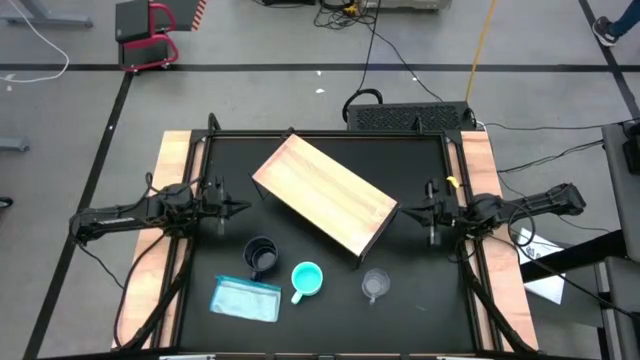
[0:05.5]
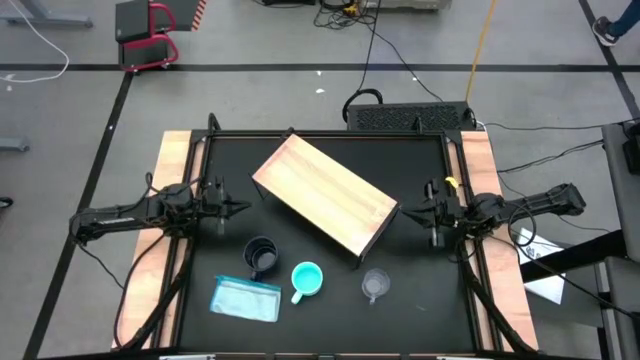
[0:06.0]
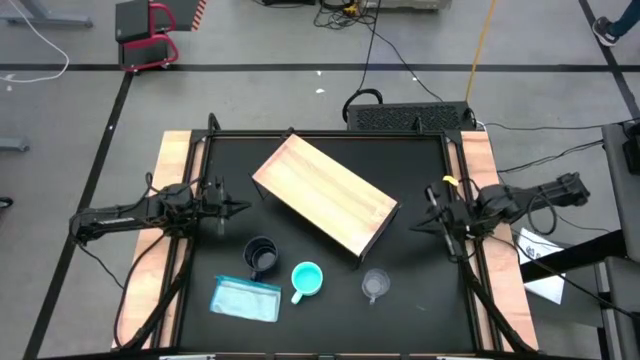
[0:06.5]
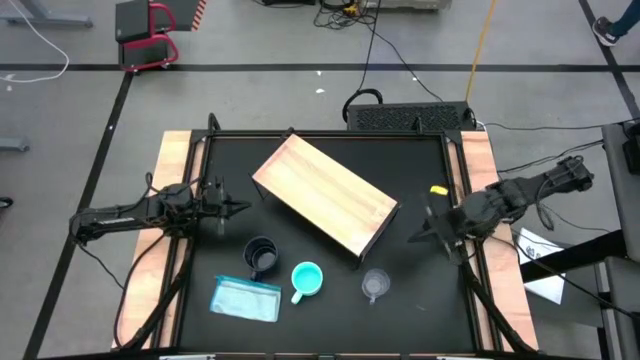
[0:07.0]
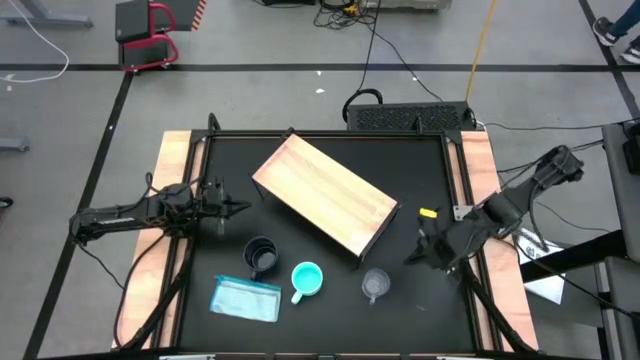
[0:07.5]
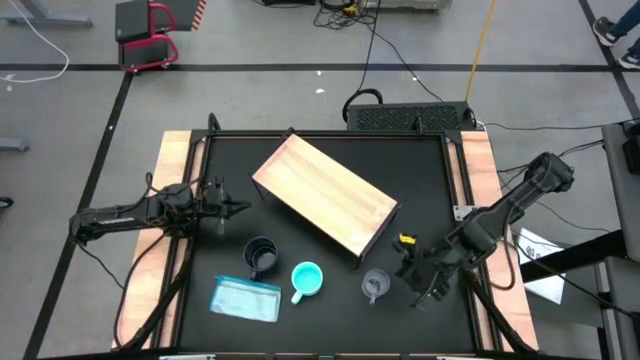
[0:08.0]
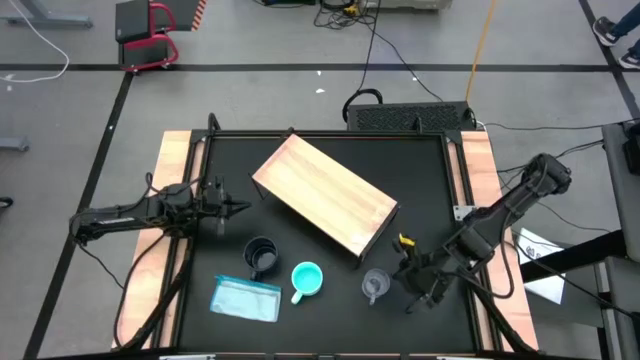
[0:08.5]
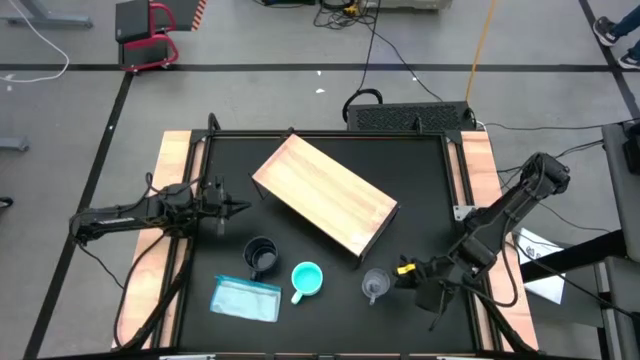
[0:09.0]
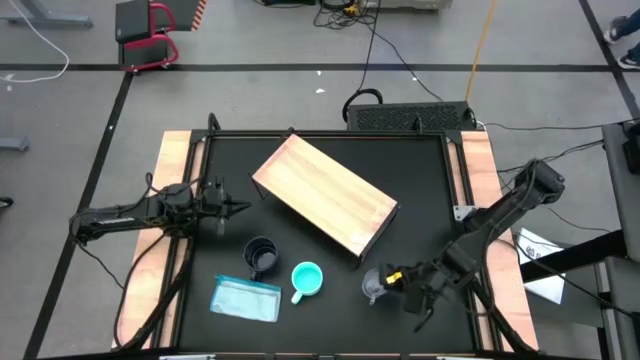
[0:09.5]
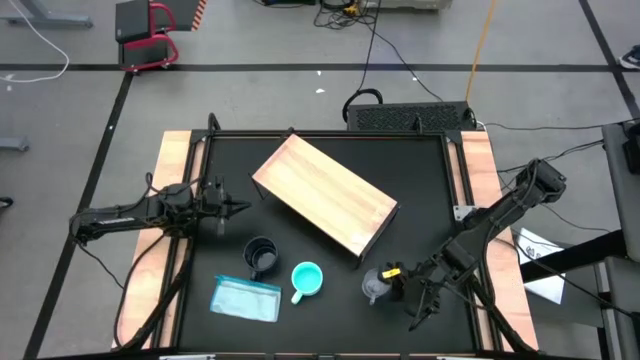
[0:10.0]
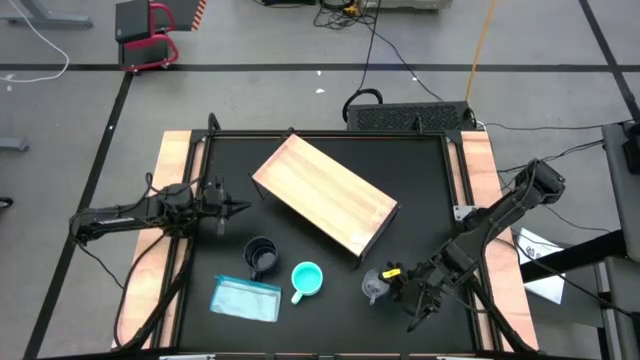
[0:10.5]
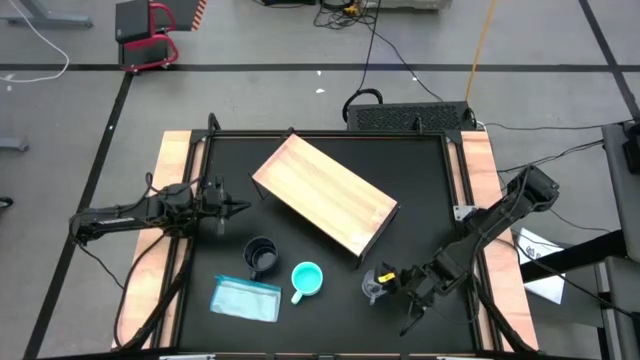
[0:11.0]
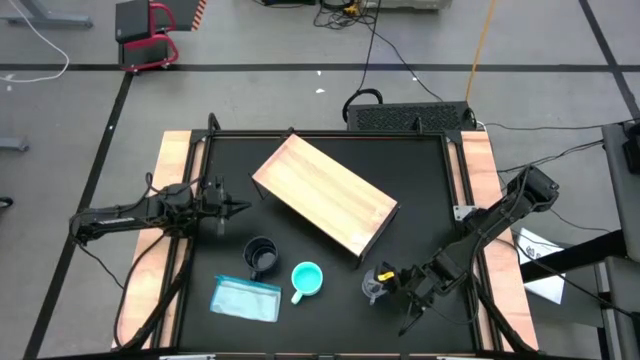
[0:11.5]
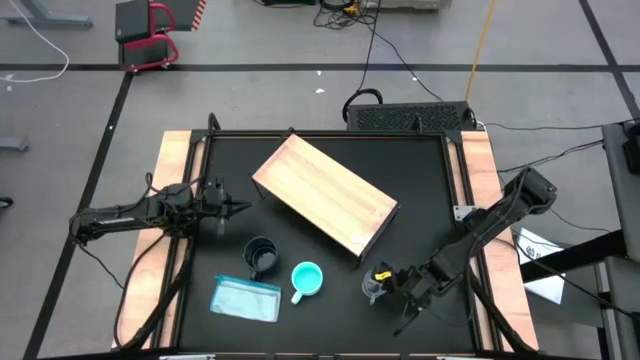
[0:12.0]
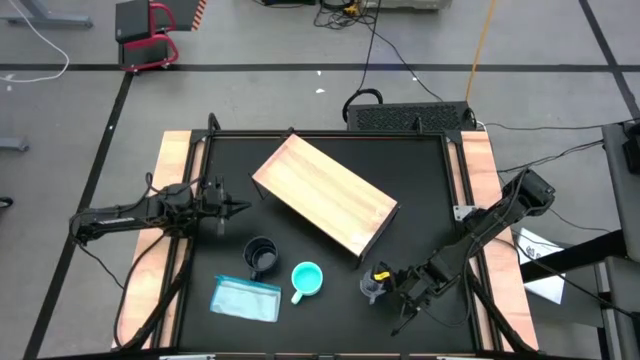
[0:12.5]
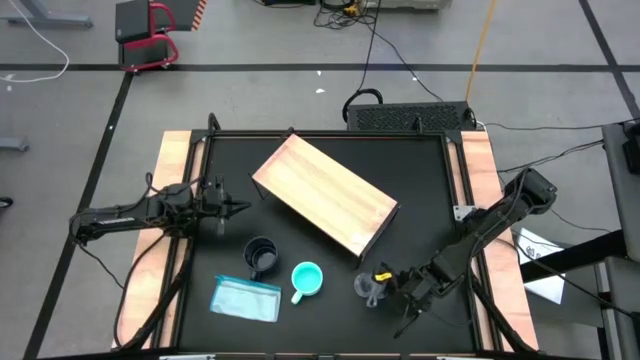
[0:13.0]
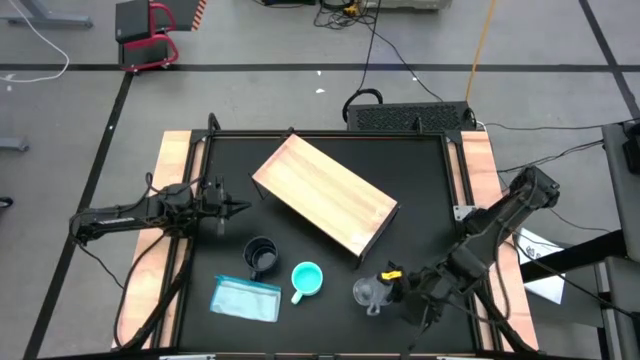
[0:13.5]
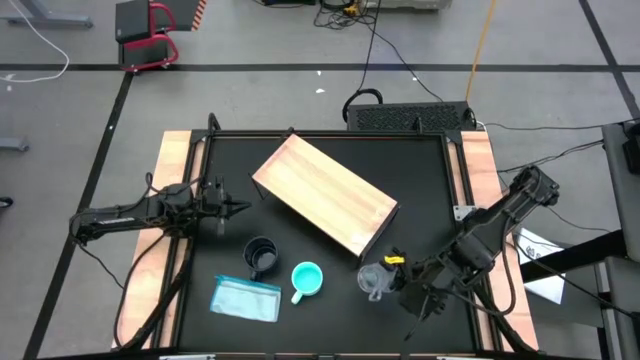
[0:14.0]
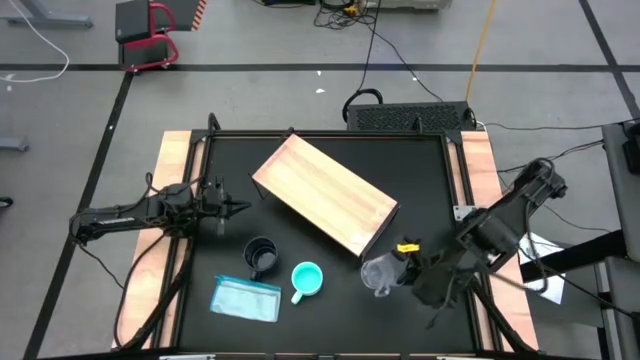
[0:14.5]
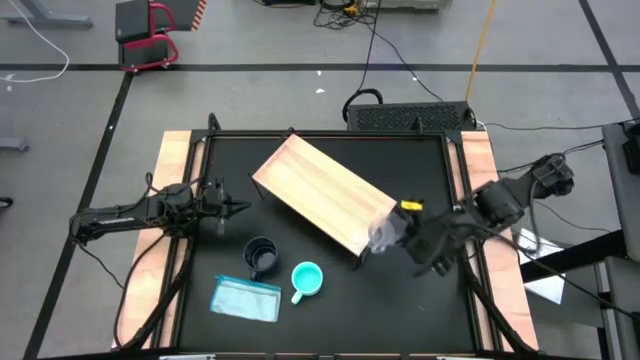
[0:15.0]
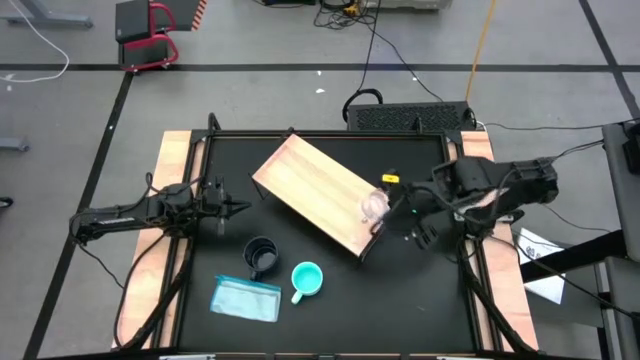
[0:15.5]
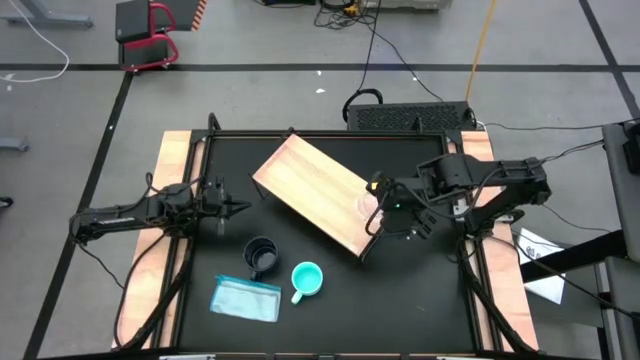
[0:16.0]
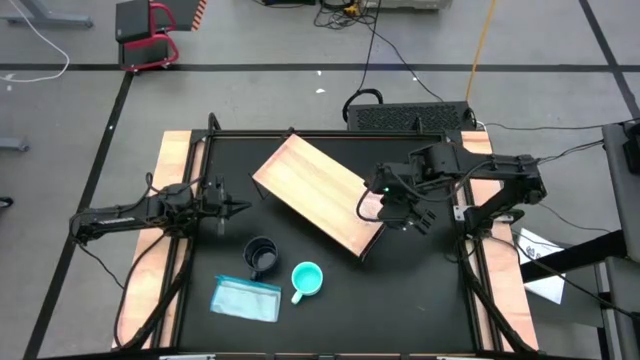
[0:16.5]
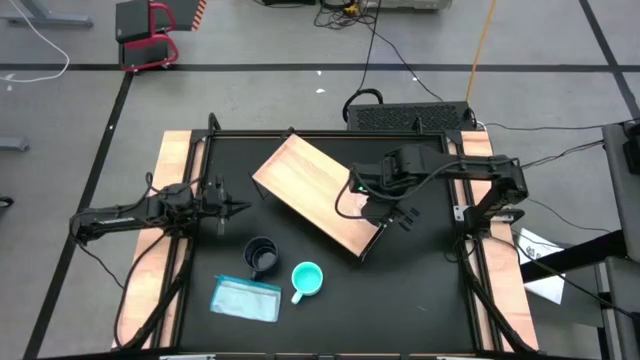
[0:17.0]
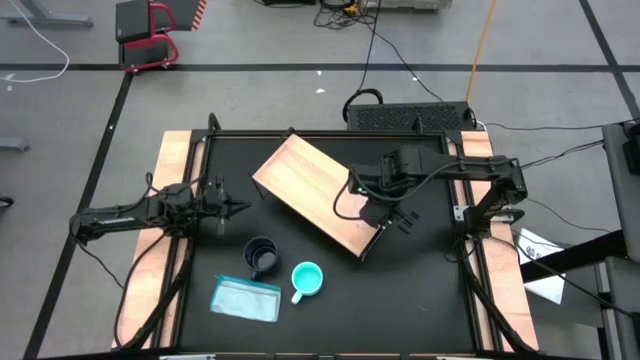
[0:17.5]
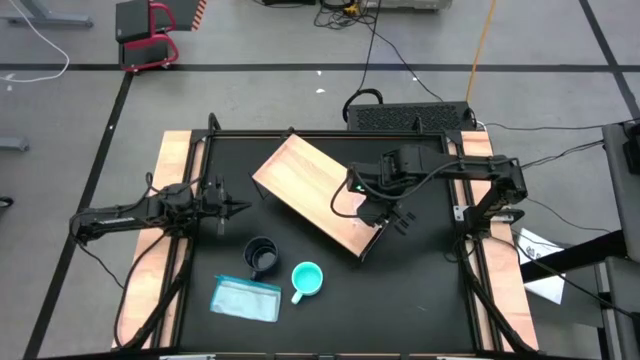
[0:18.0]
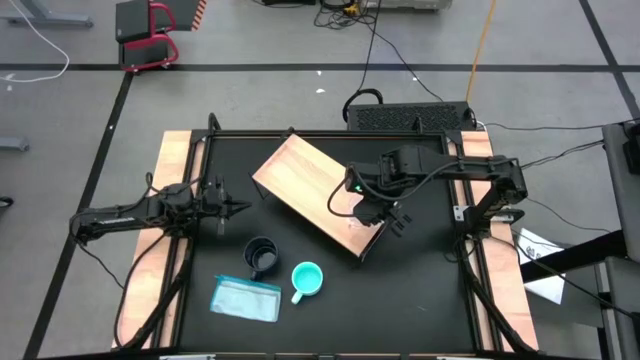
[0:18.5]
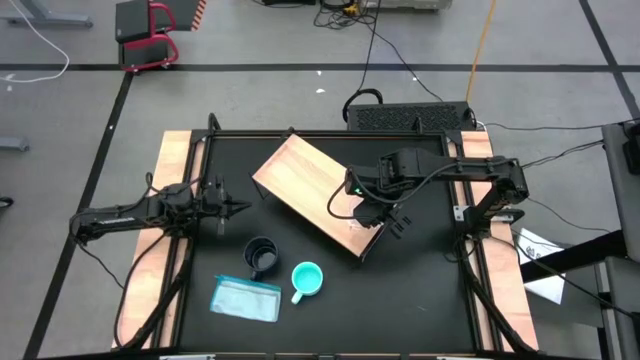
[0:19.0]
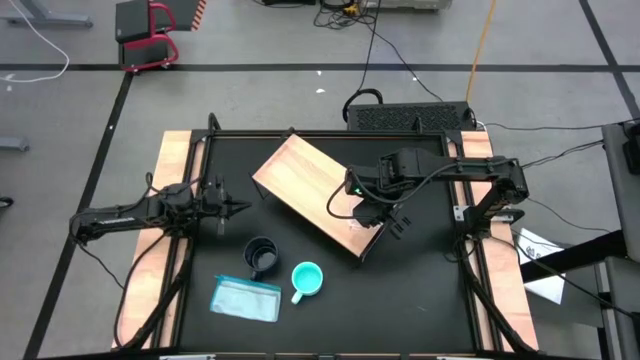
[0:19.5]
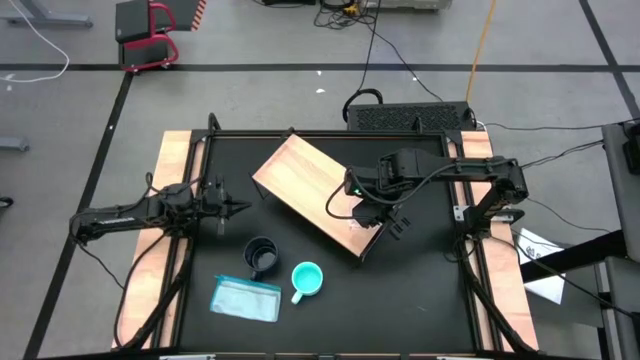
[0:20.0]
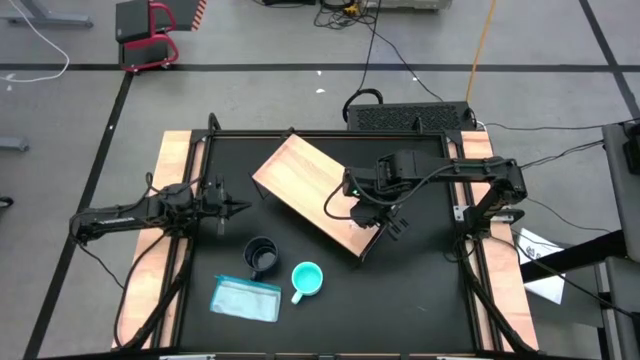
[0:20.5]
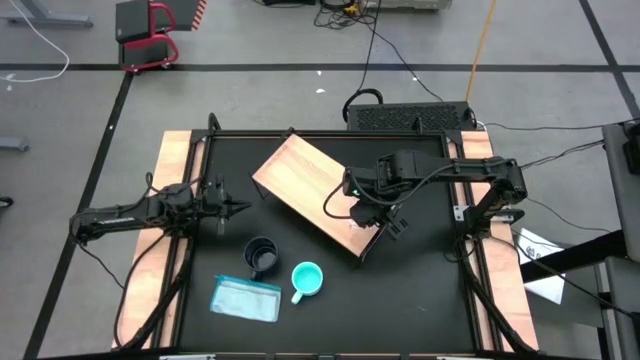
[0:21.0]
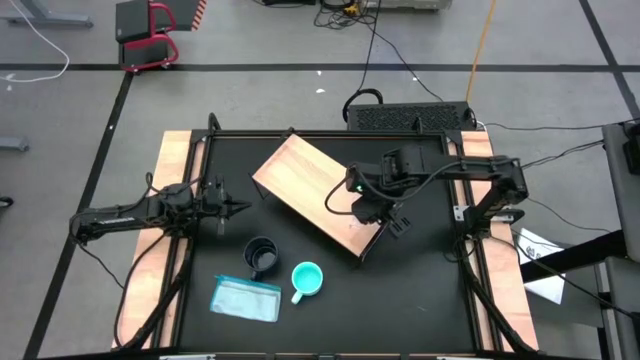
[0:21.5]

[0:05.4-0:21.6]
Task: Stack small to large cups/mugs on shelf
Put the transparent mug on the shelf

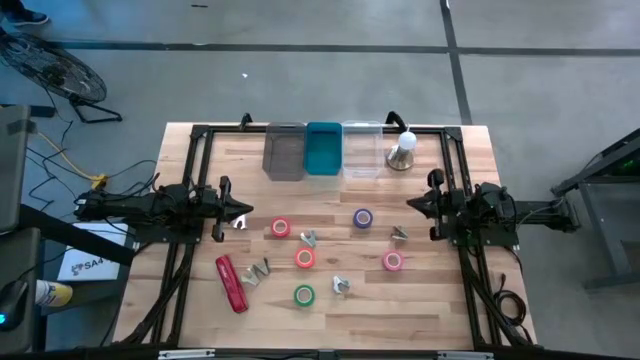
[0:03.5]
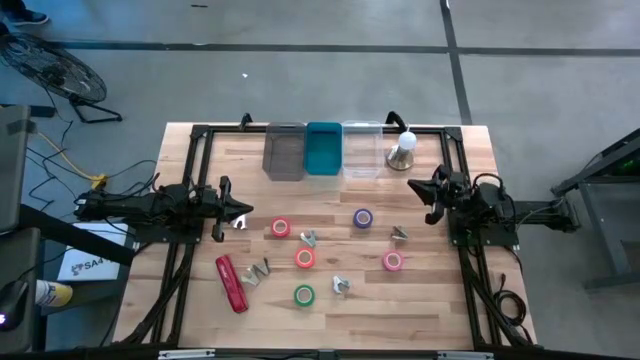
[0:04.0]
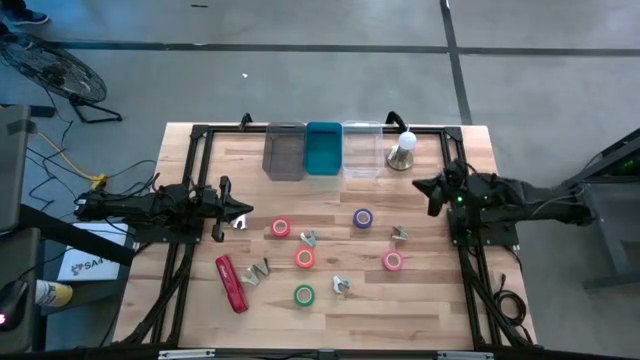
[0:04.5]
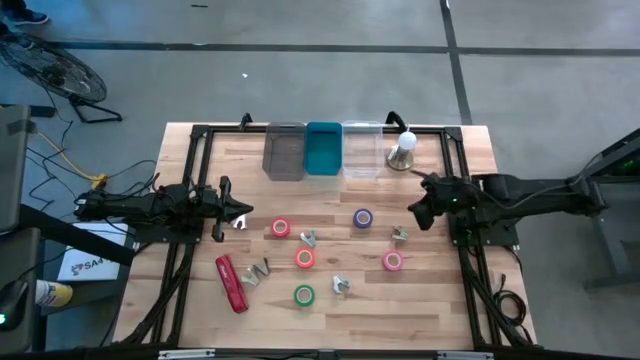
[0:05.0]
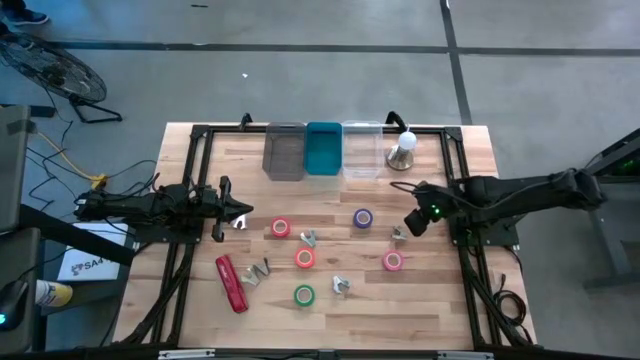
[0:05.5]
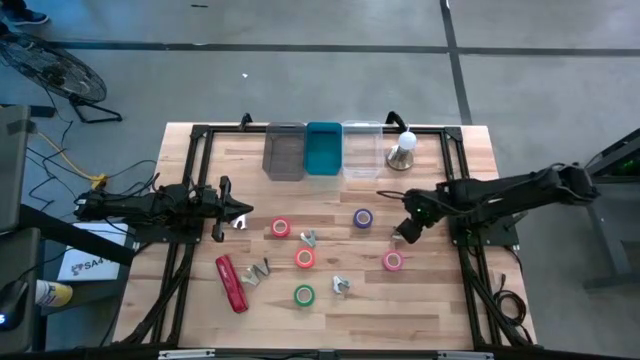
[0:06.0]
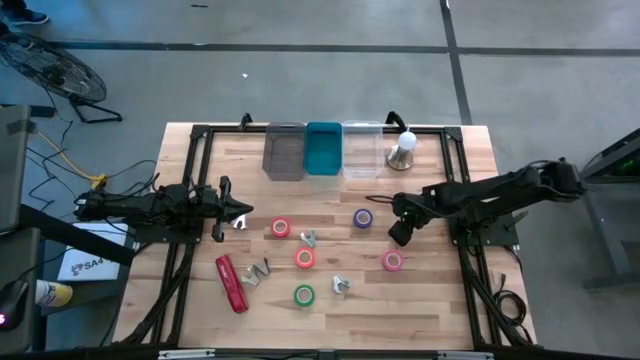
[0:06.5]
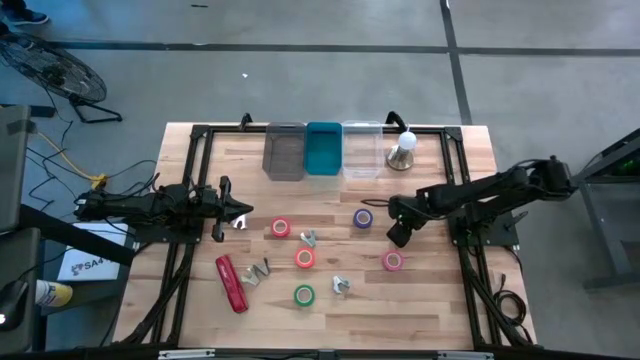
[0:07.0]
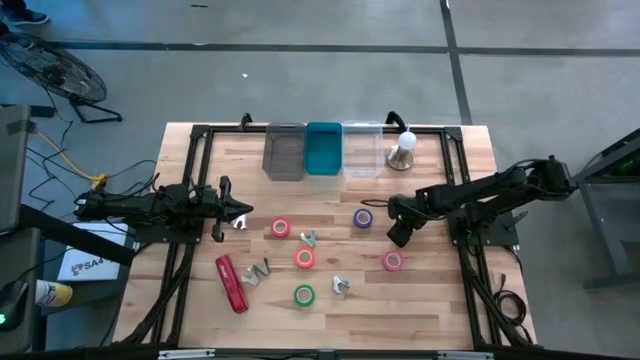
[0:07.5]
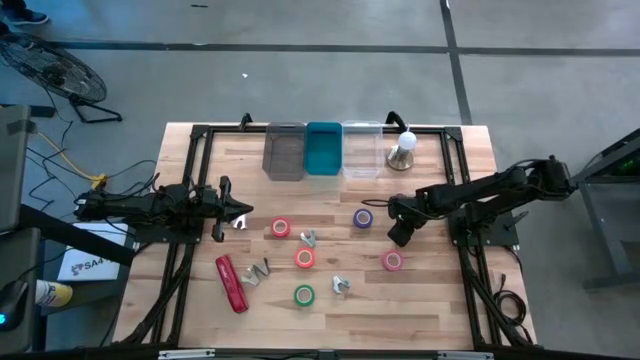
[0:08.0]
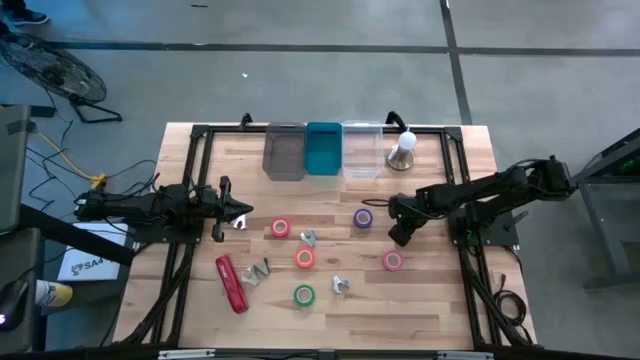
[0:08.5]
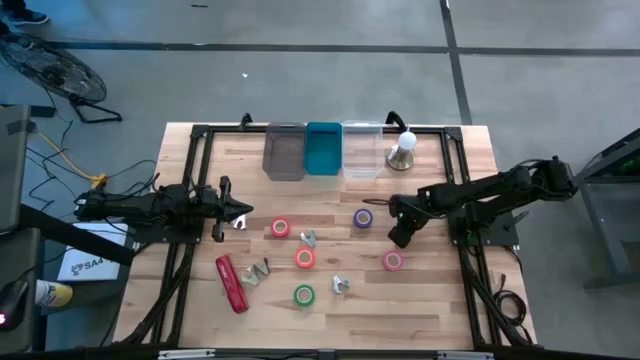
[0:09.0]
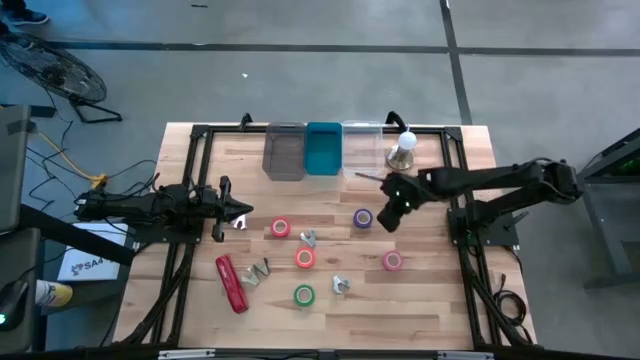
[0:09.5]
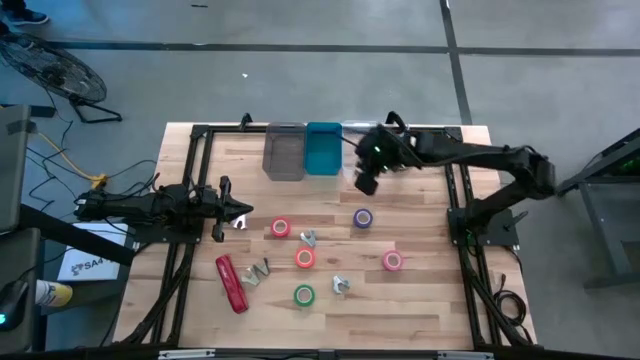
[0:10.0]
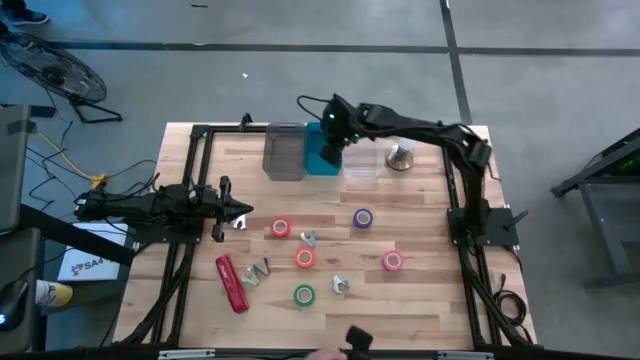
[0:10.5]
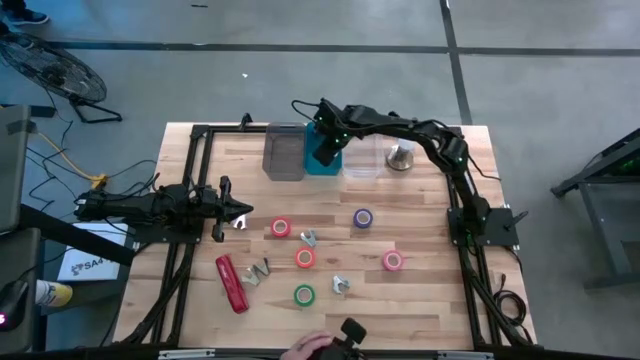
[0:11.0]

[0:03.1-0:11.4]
Task: Pick and place Stapler, Stapler remover, tape
Put the top gray staple remover into the blue bin
